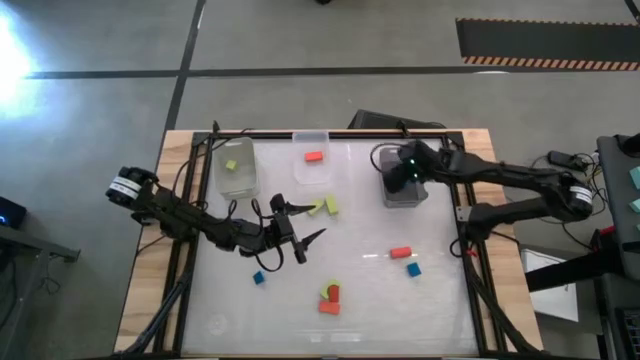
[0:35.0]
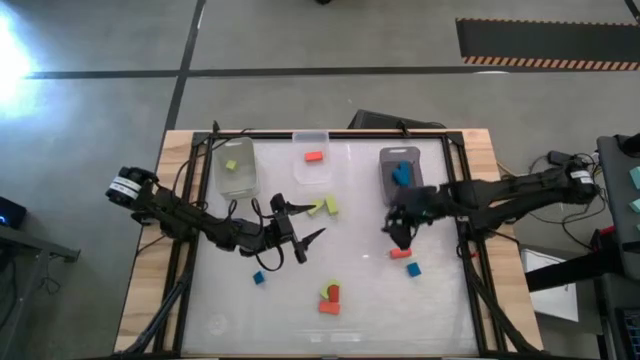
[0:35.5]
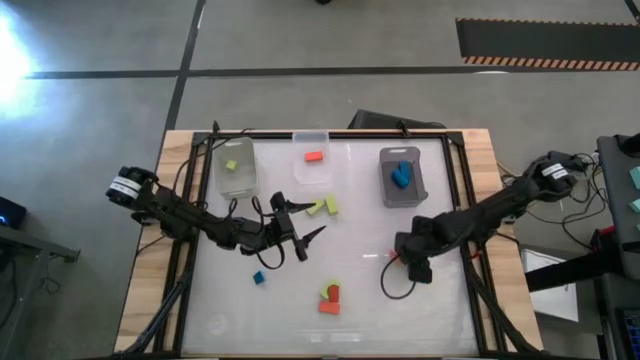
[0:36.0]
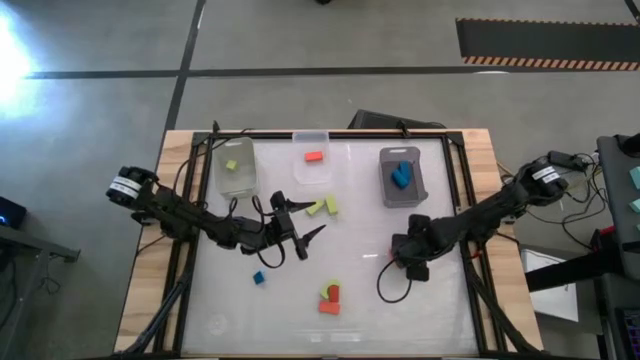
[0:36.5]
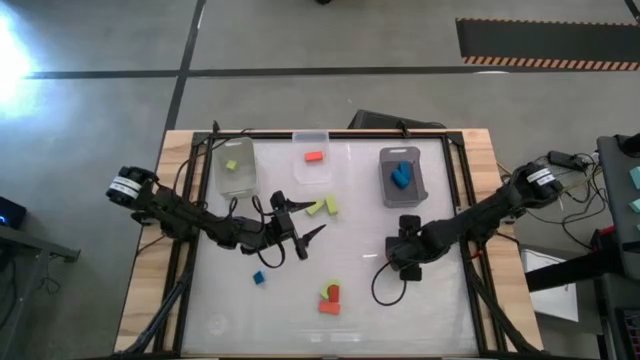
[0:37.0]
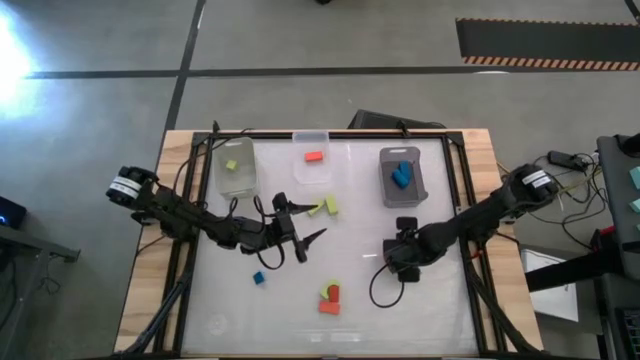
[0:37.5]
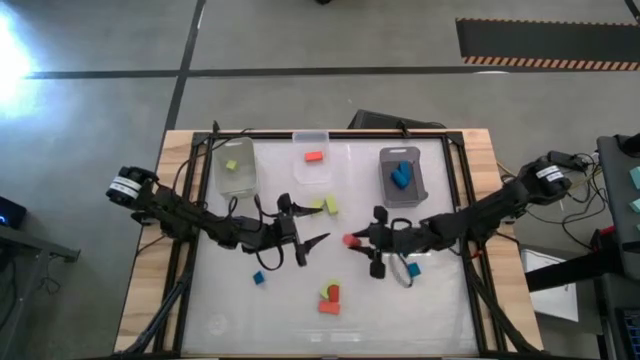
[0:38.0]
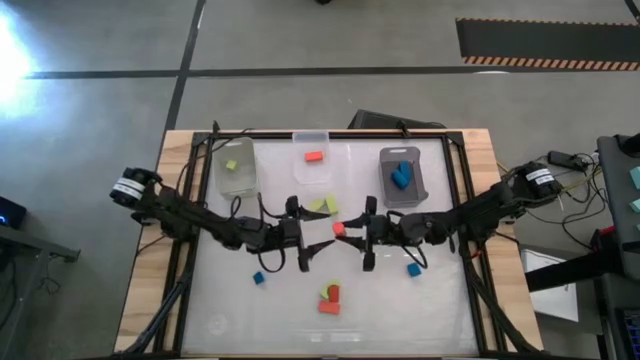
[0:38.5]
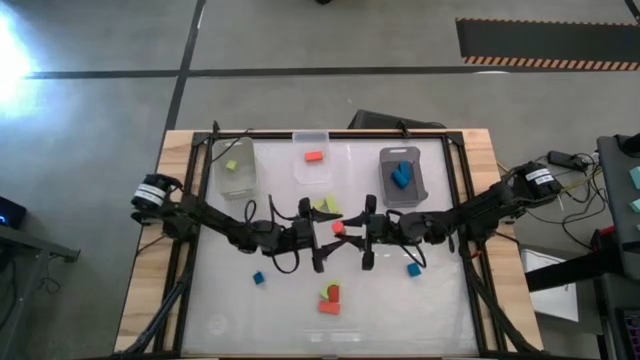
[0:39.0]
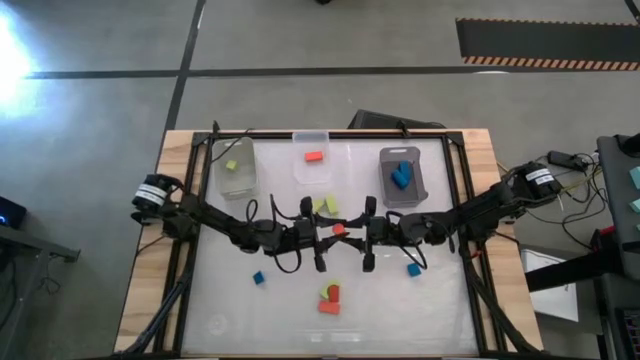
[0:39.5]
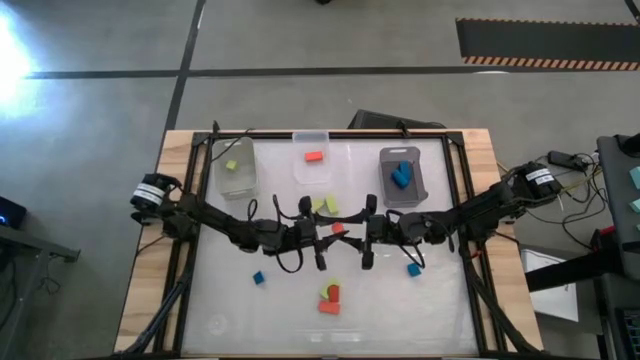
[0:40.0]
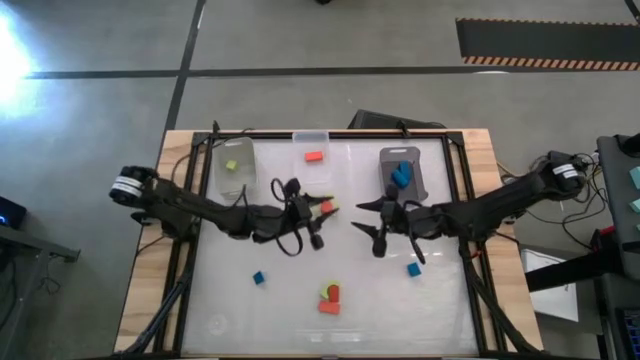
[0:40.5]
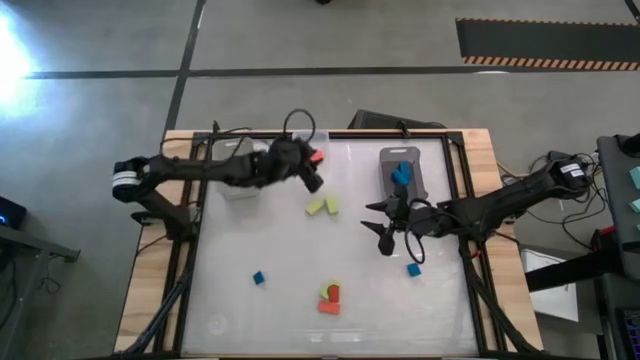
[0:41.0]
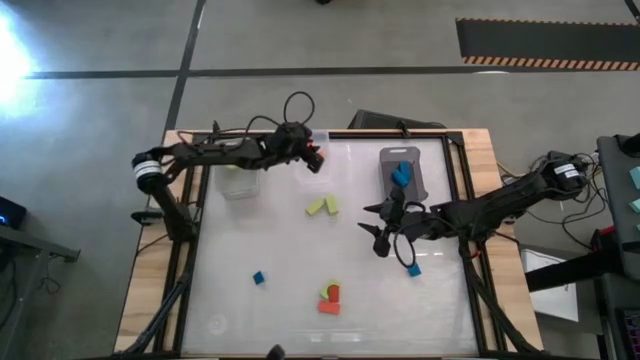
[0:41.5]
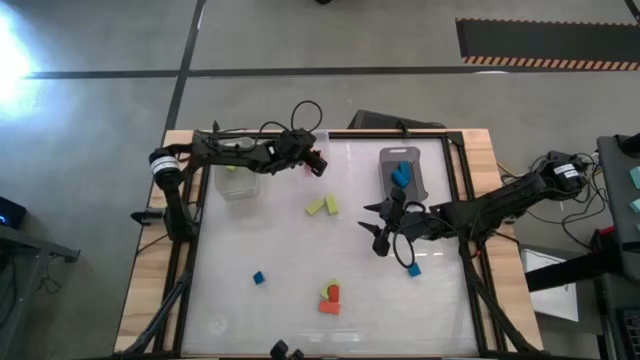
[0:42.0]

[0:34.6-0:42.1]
Task: Sort & place blocks by color
Put the orange block into the transparent bin

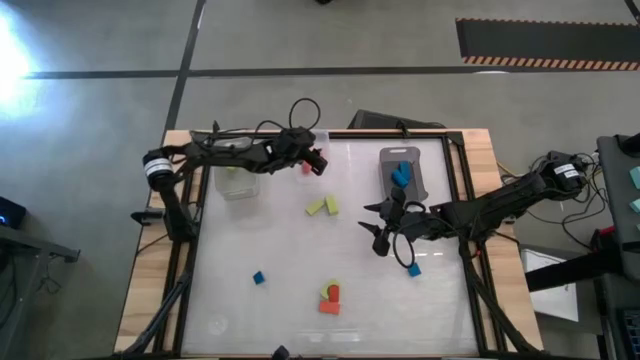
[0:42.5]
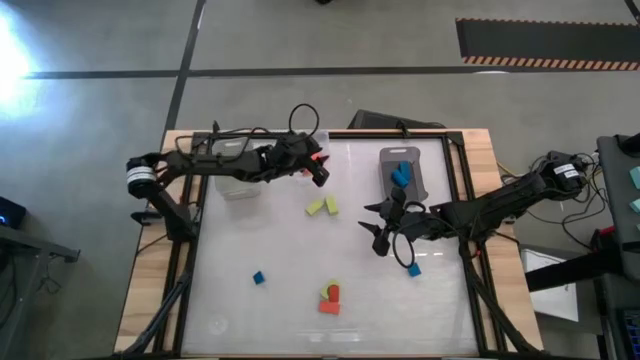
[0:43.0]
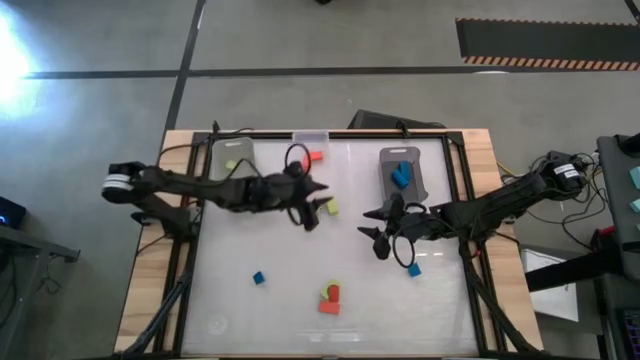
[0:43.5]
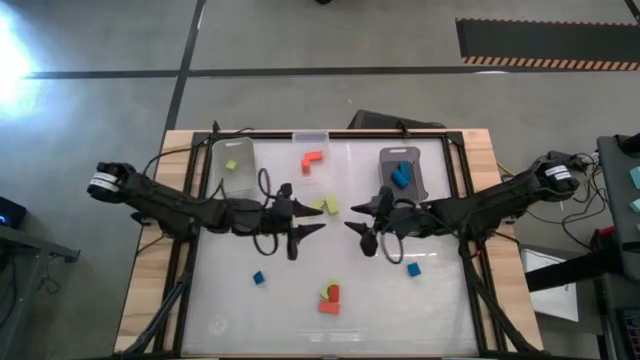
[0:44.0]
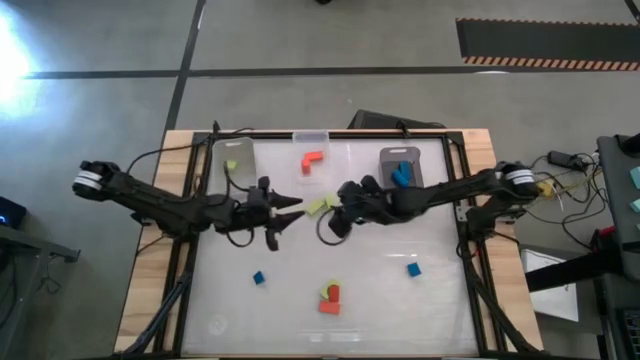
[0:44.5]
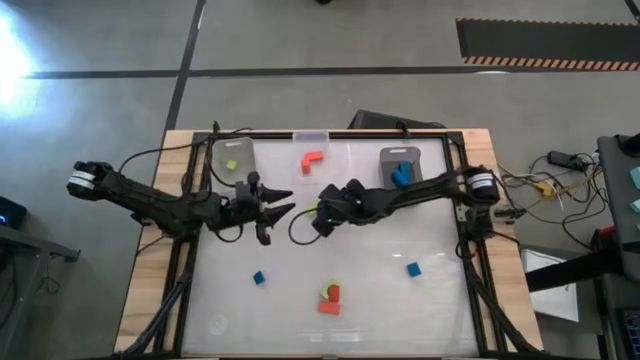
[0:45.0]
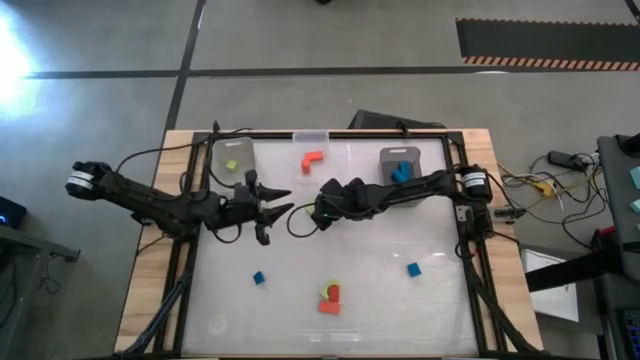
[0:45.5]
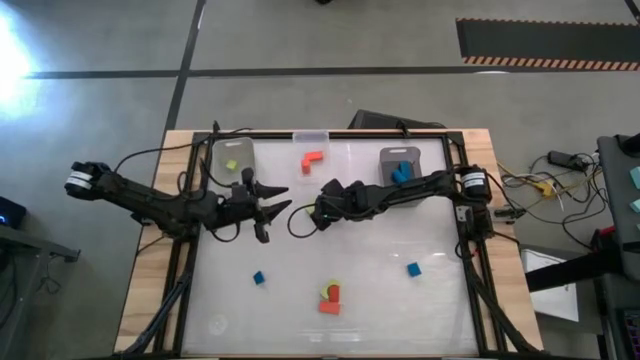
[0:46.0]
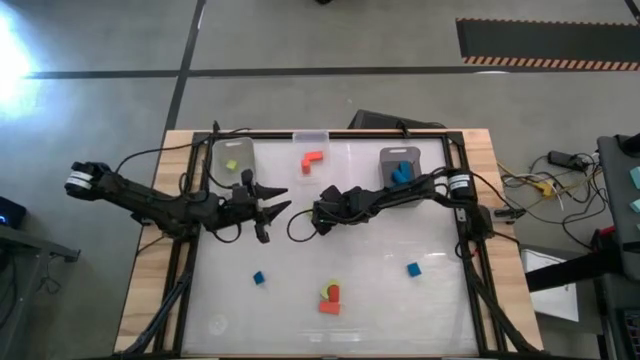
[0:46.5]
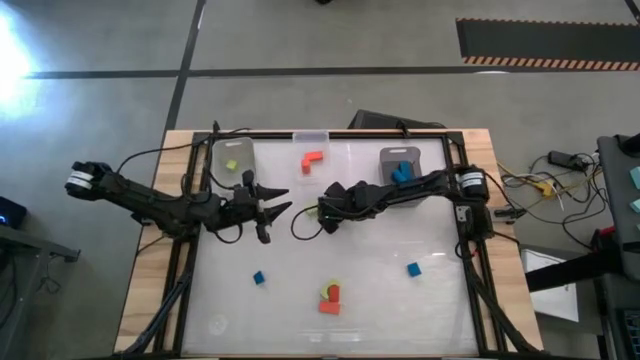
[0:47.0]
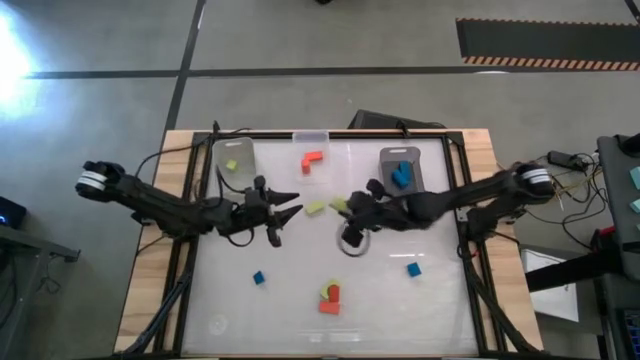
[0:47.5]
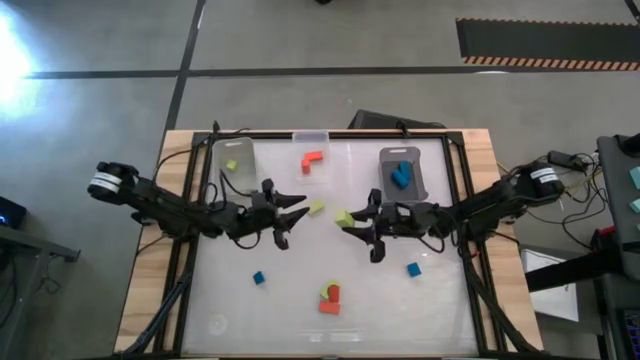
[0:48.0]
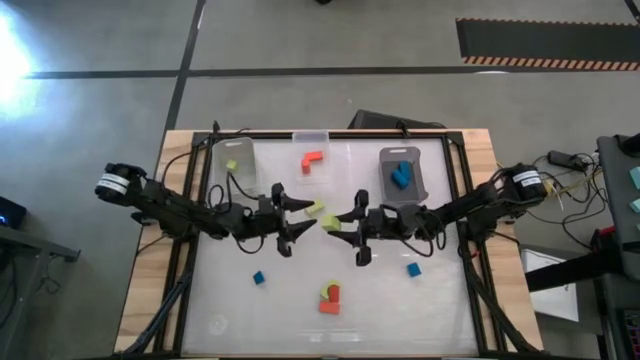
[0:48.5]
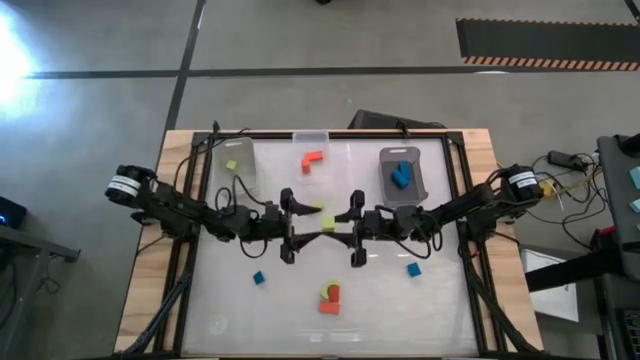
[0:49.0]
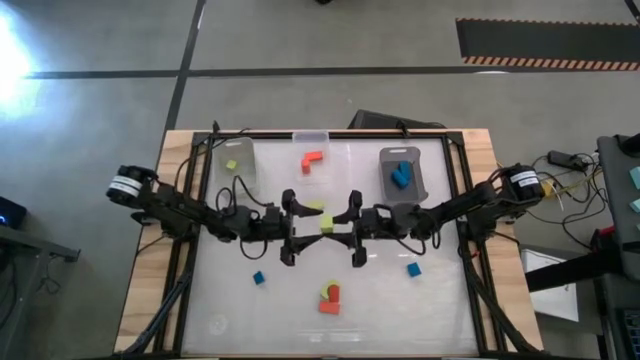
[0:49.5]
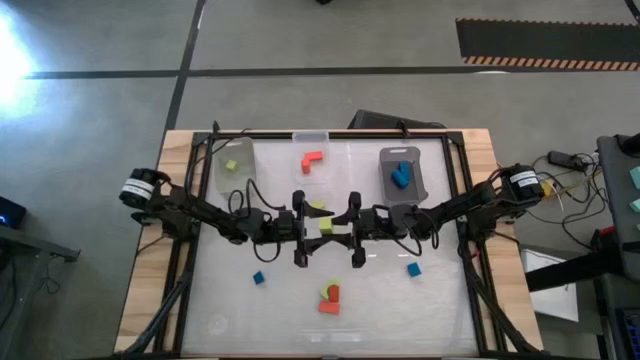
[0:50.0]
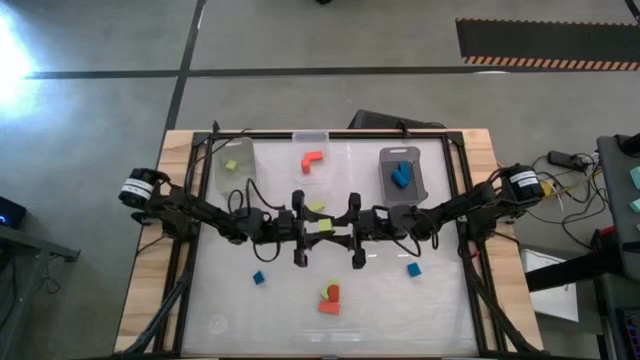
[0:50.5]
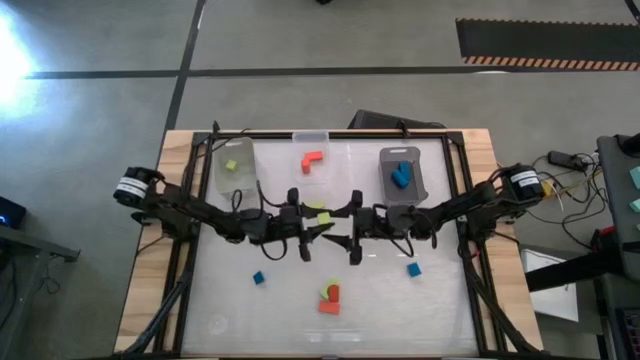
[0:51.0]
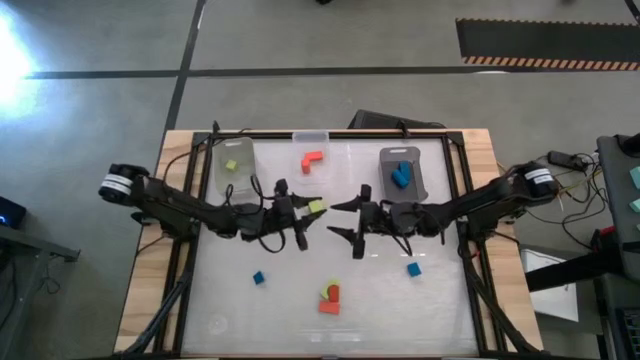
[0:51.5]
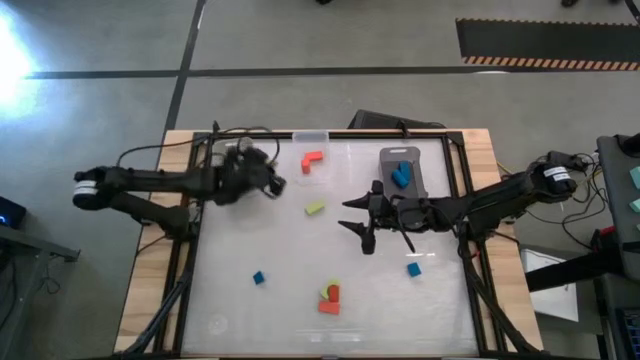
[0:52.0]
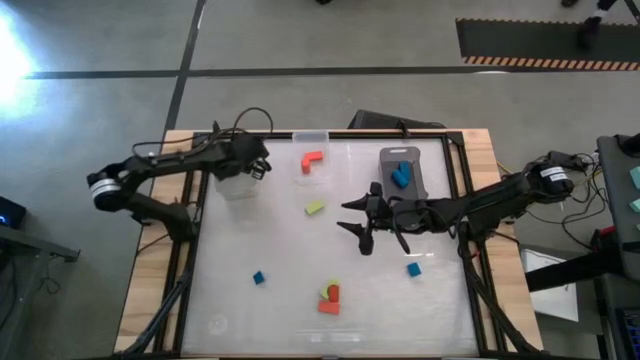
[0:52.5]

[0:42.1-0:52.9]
Put the green block into the white bin

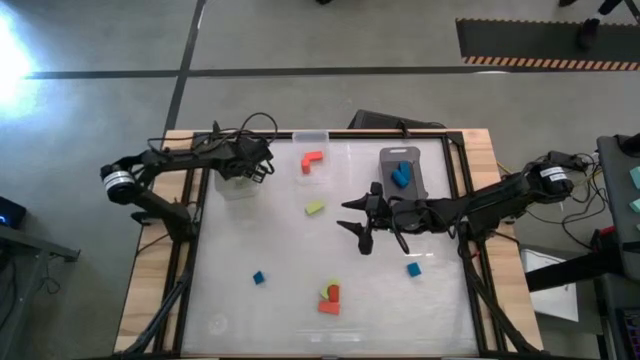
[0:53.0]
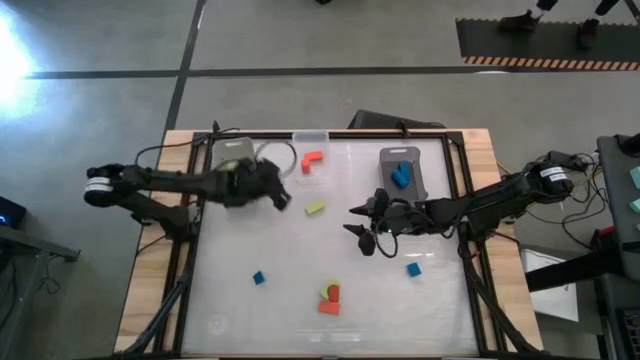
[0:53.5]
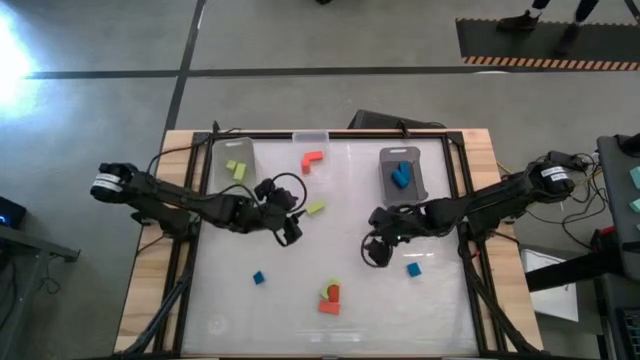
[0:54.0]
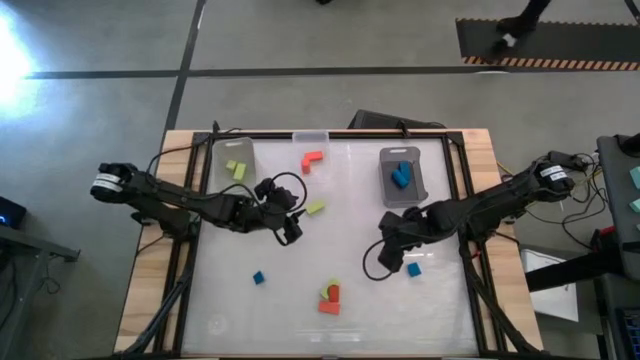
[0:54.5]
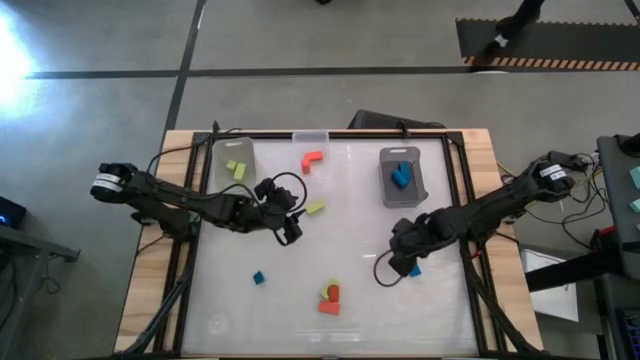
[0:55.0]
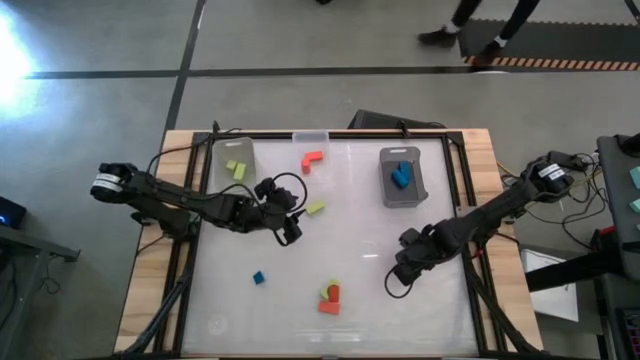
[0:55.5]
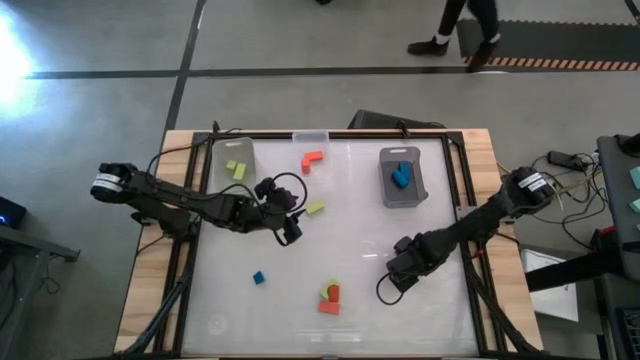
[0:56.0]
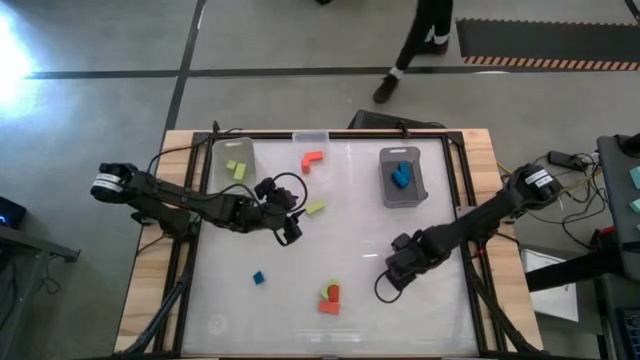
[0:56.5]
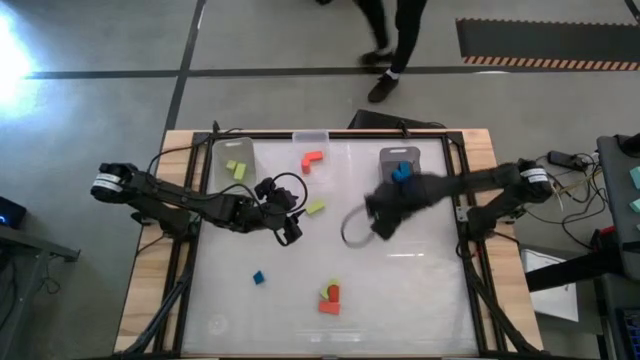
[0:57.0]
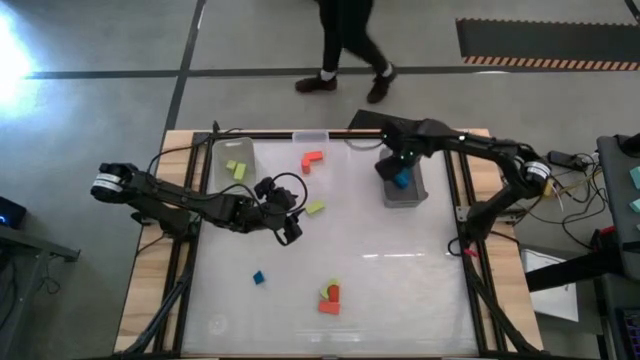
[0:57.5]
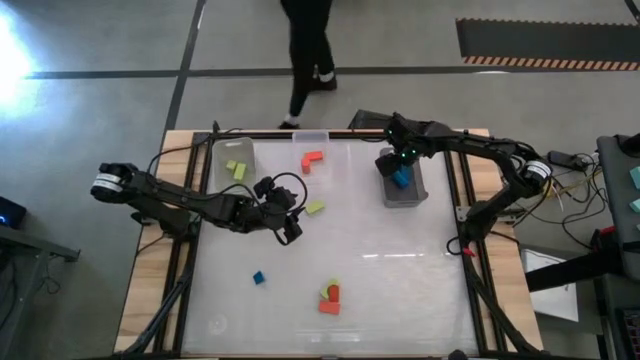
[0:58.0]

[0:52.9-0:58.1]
Put the blue block into the black bin
